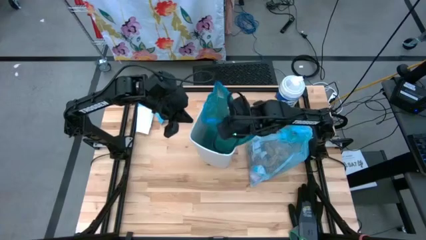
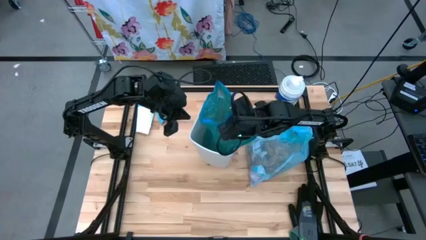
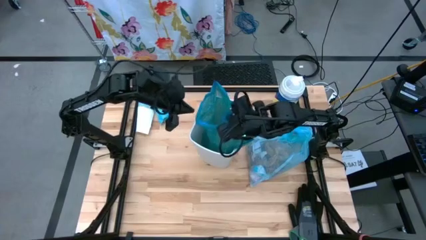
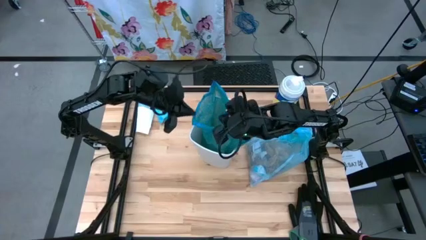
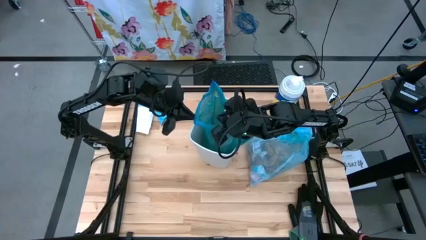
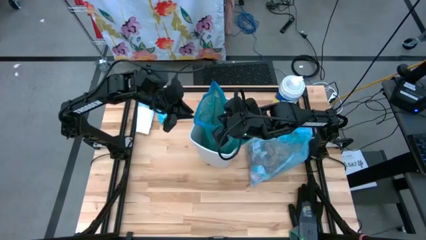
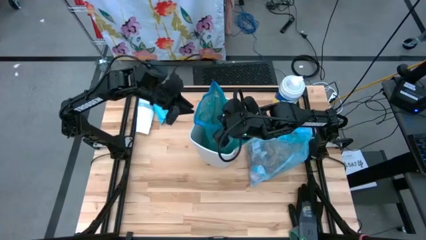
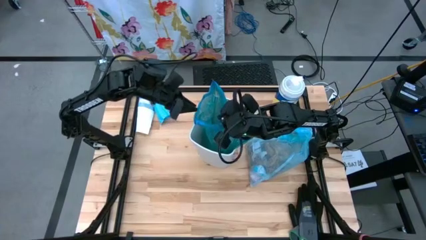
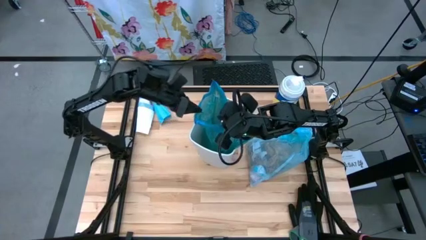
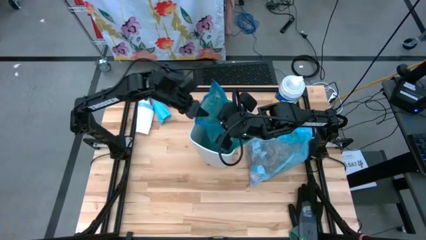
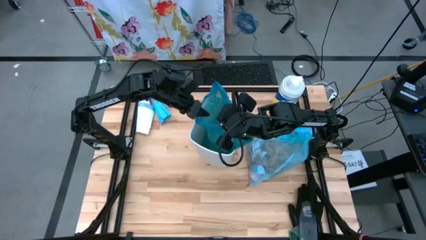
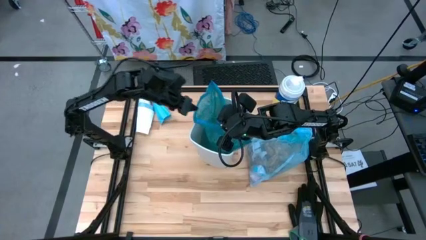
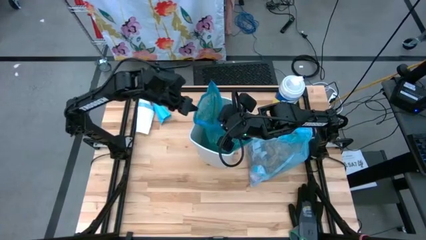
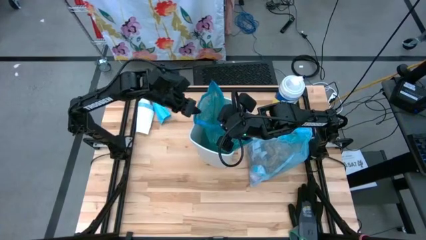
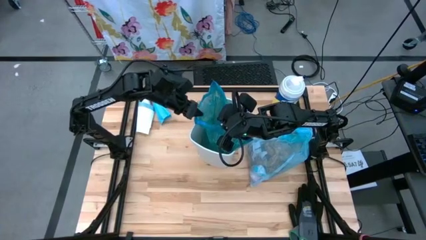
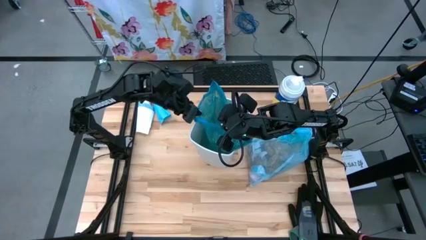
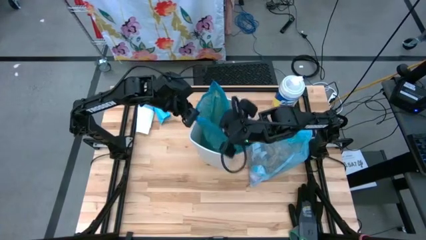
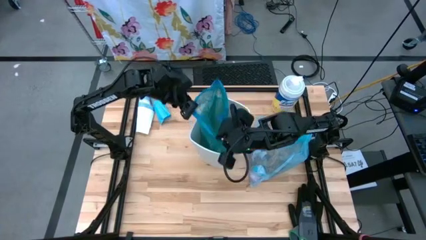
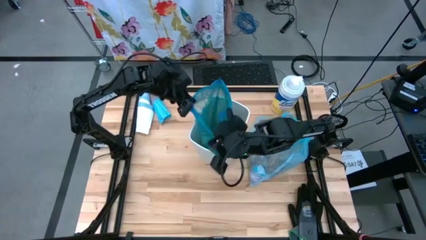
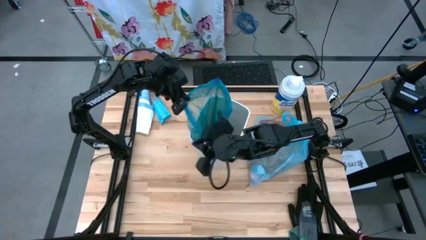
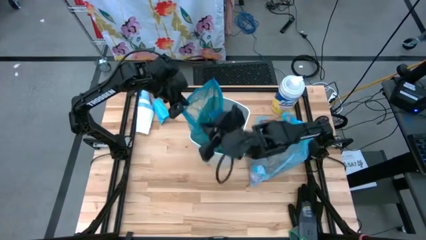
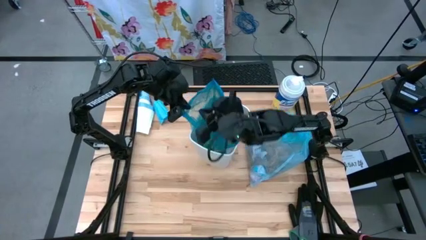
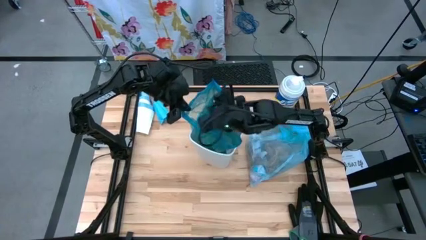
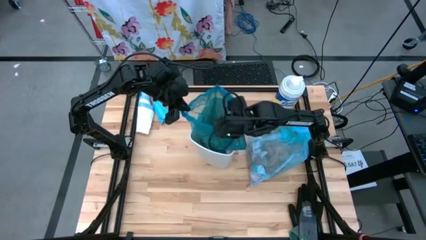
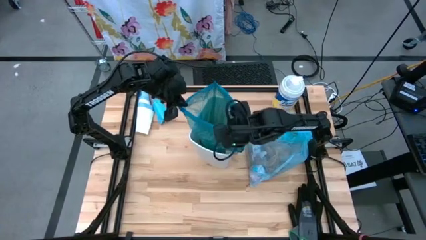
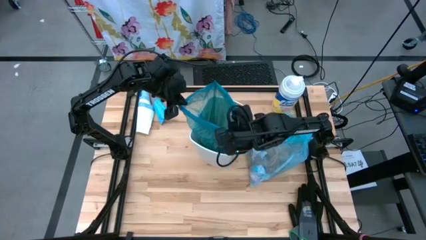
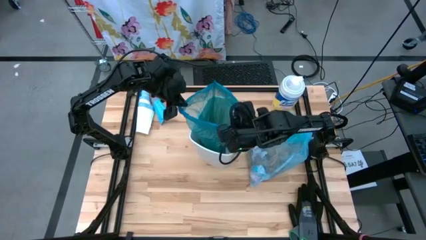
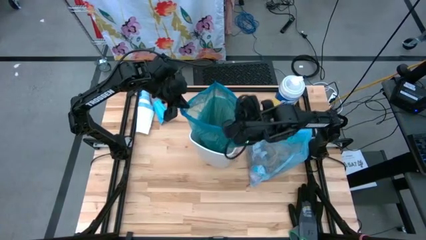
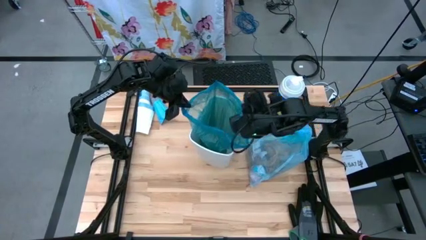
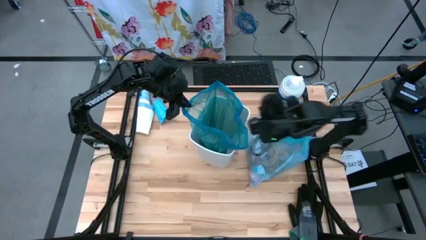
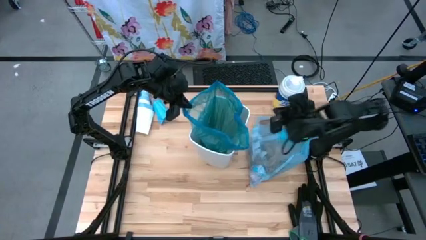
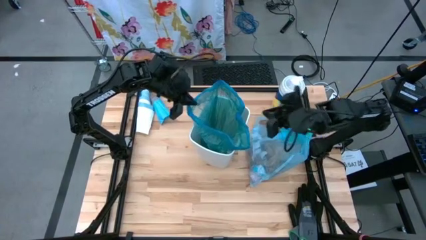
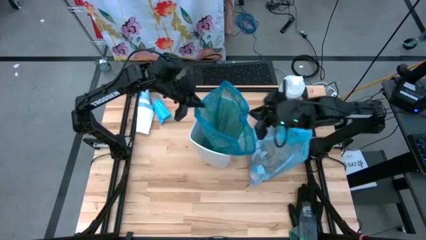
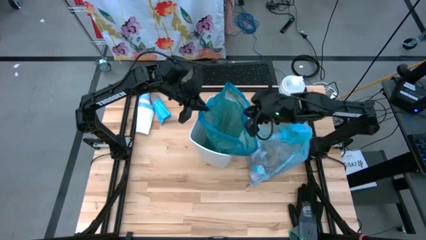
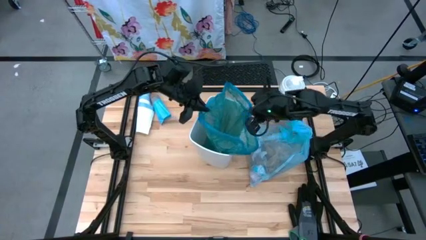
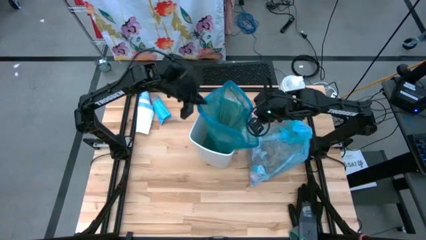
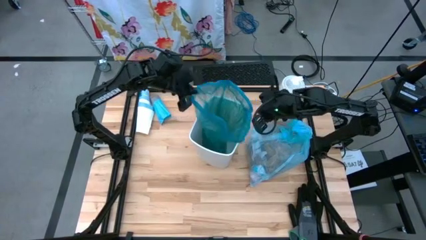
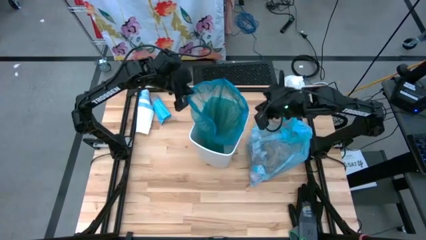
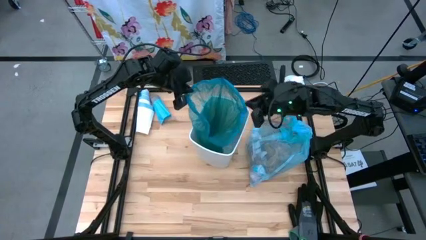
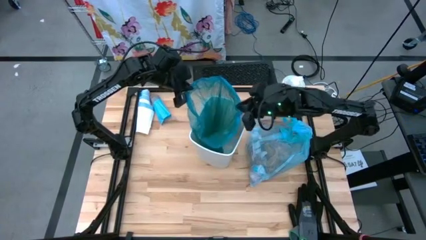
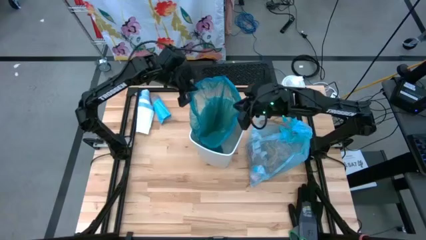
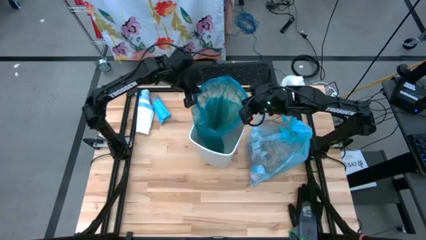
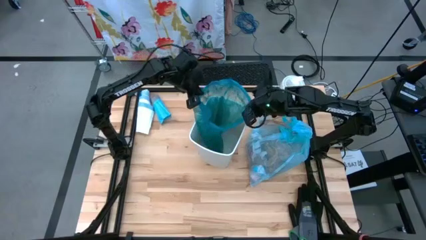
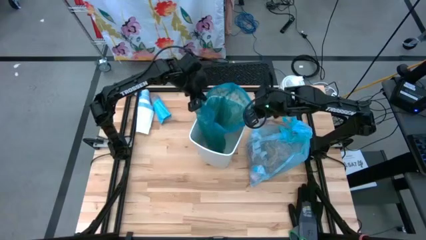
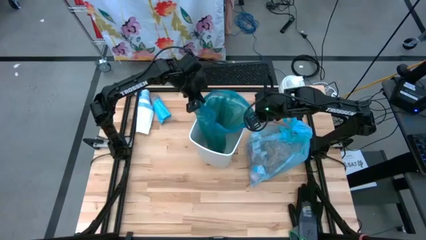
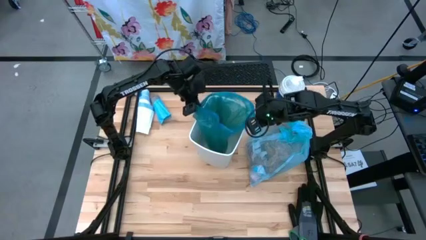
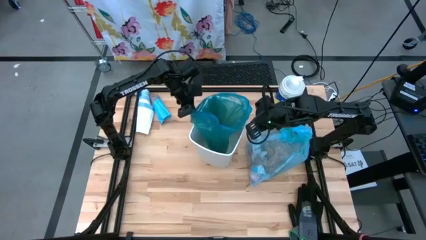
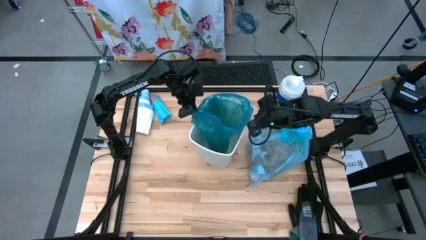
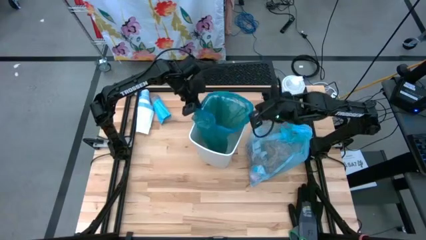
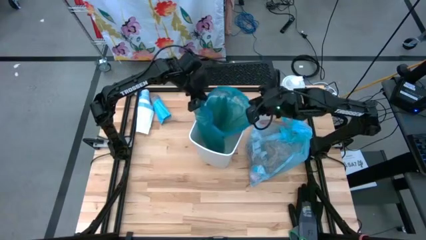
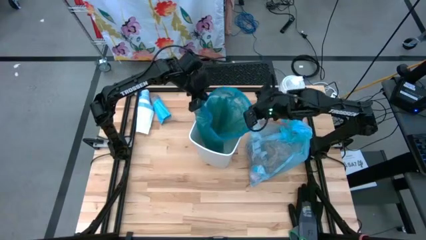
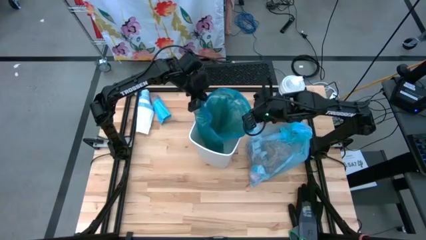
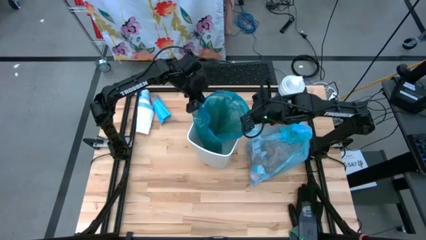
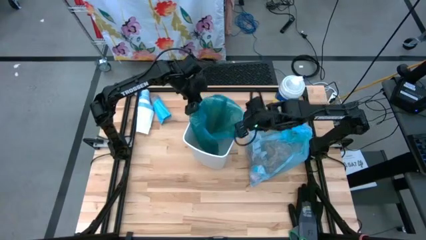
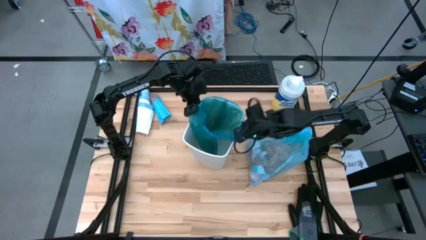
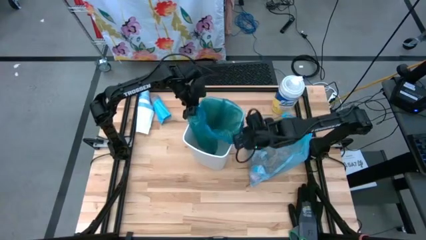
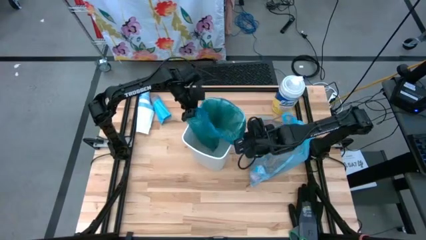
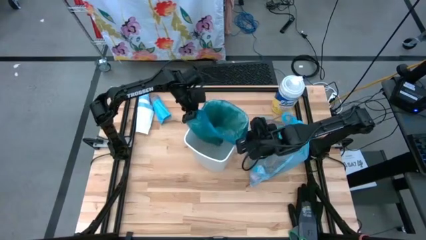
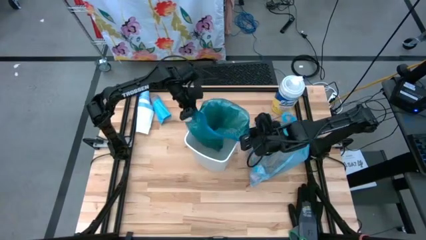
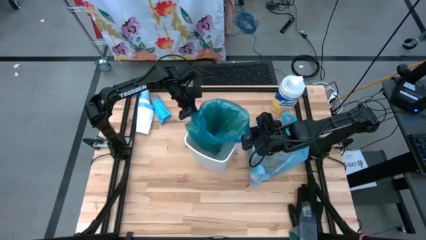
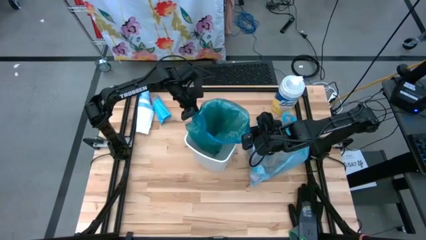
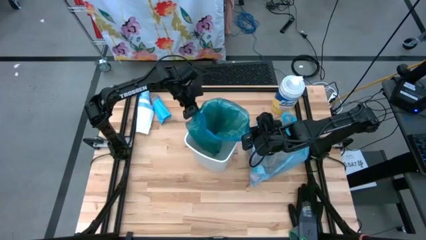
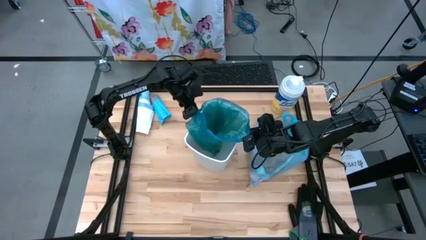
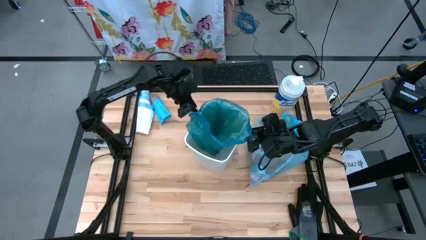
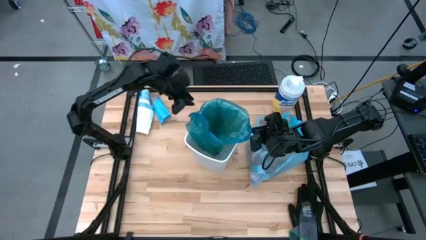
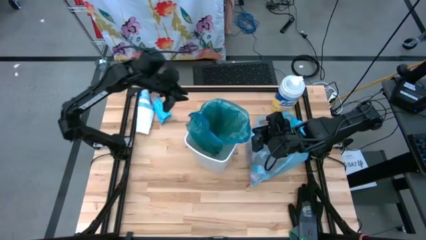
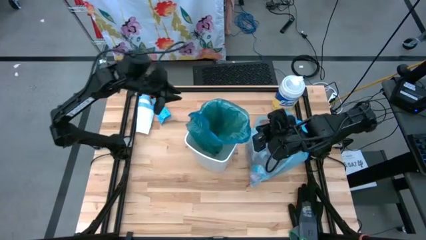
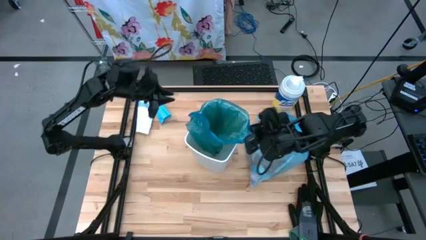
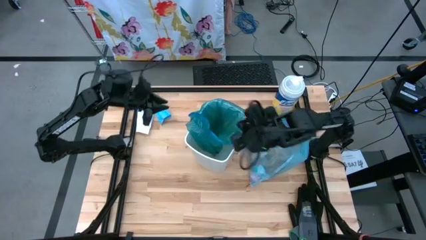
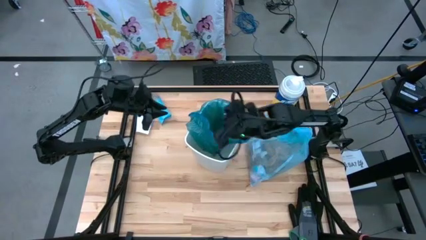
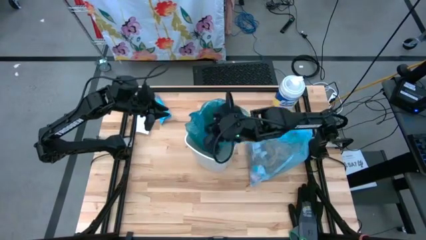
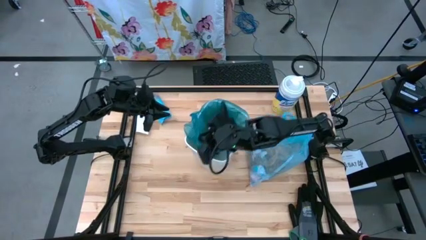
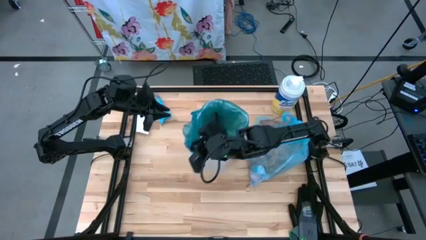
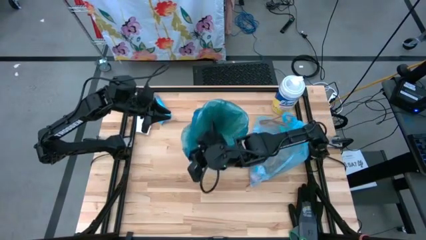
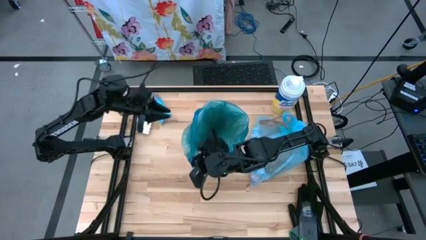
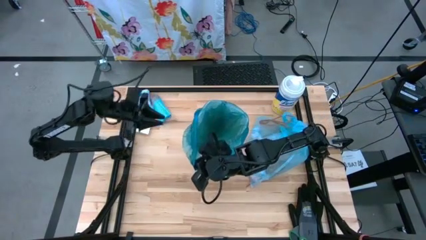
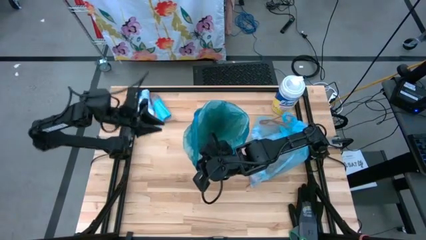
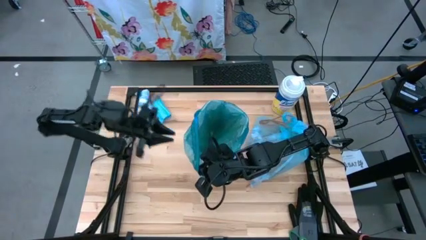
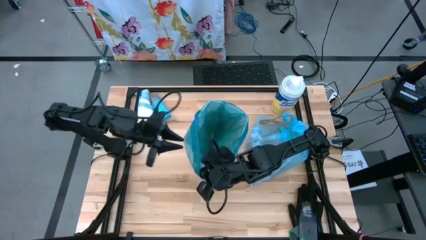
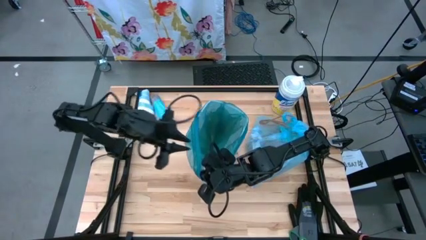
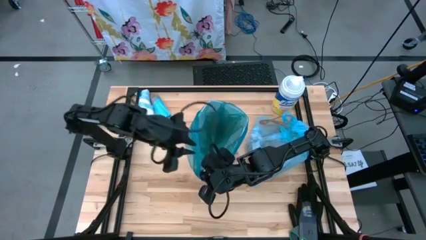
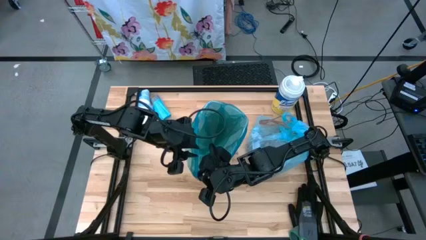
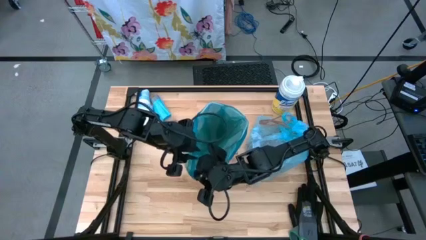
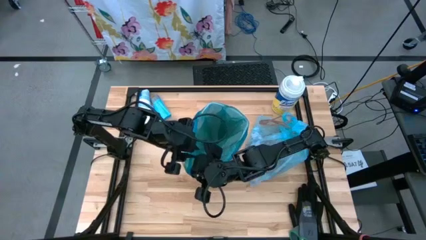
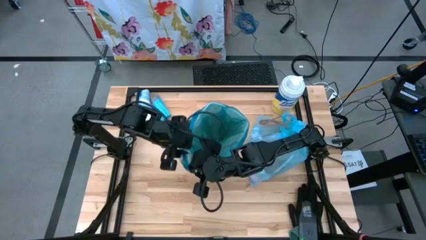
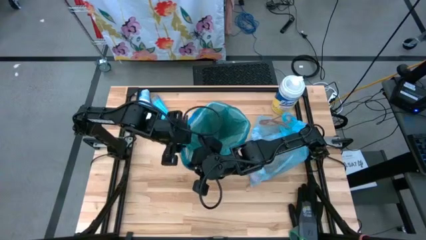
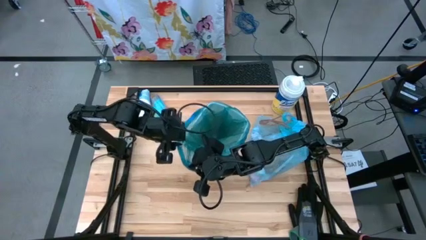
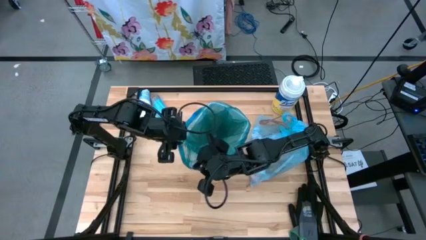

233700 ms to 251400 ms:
Task: place trash/remove bag and relplace
Insert the blue trash bag into the white trash bin
